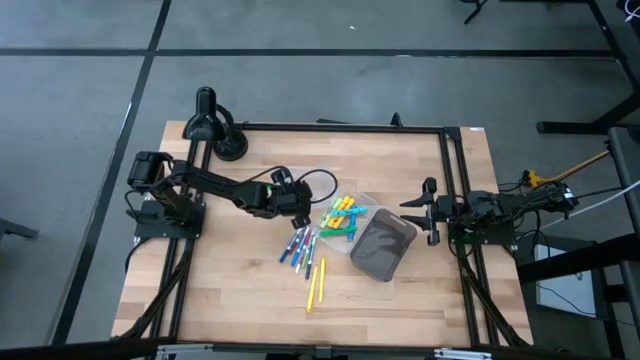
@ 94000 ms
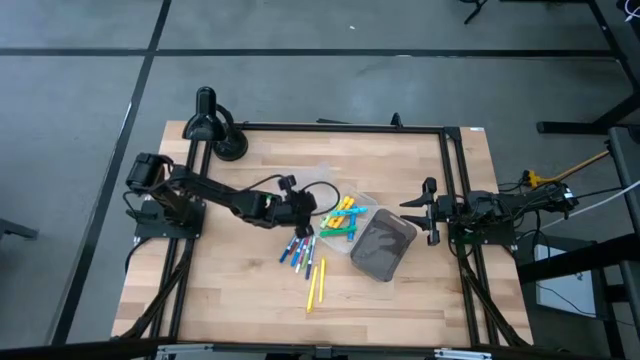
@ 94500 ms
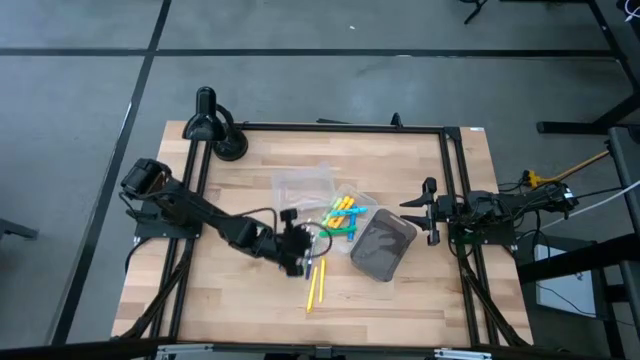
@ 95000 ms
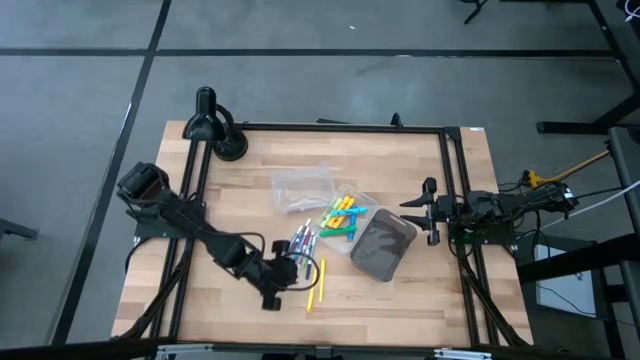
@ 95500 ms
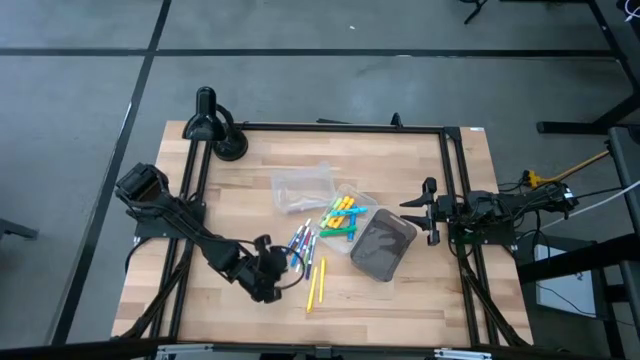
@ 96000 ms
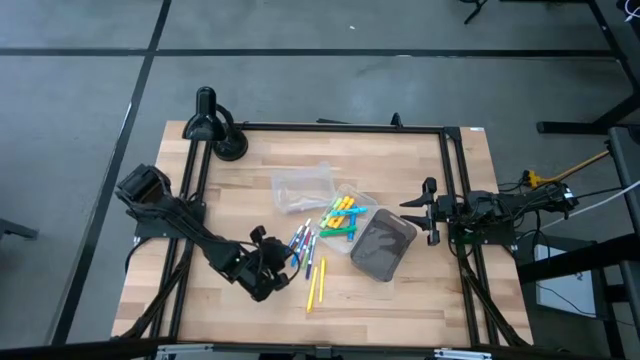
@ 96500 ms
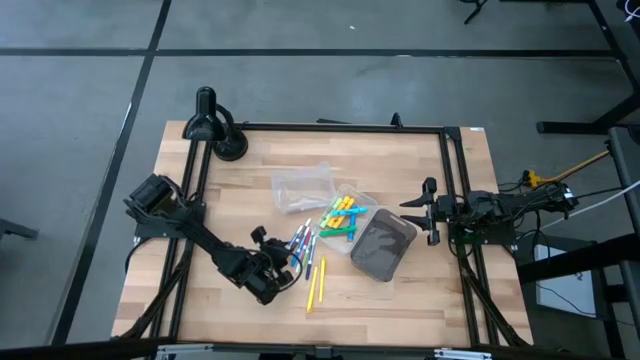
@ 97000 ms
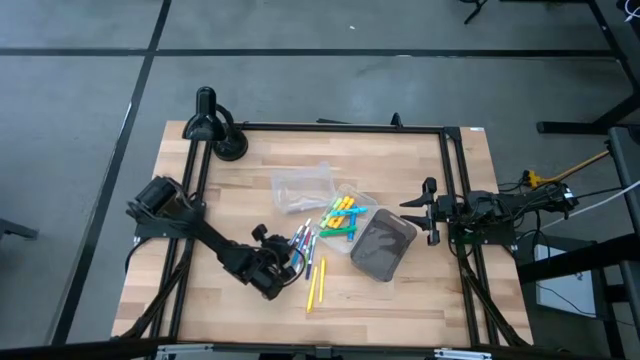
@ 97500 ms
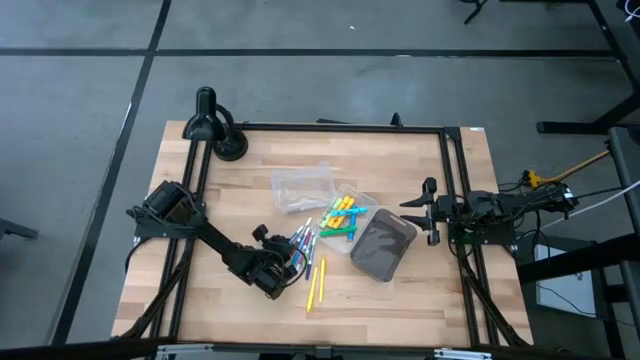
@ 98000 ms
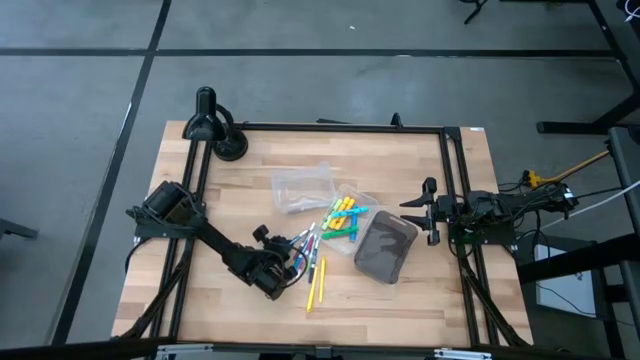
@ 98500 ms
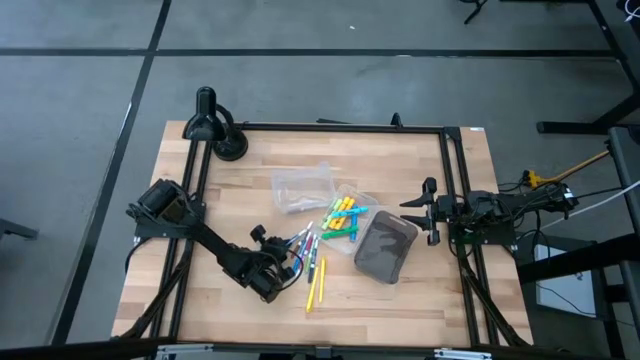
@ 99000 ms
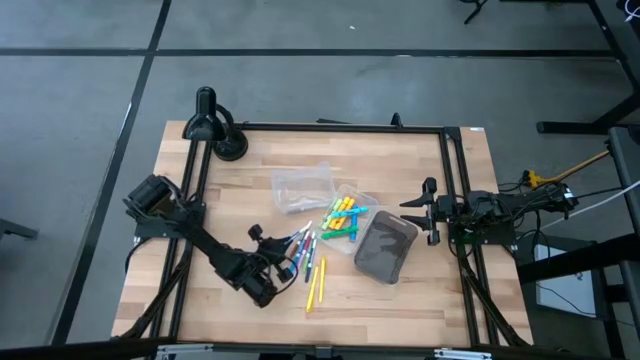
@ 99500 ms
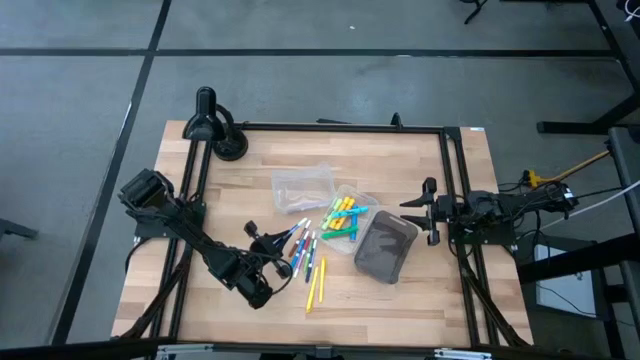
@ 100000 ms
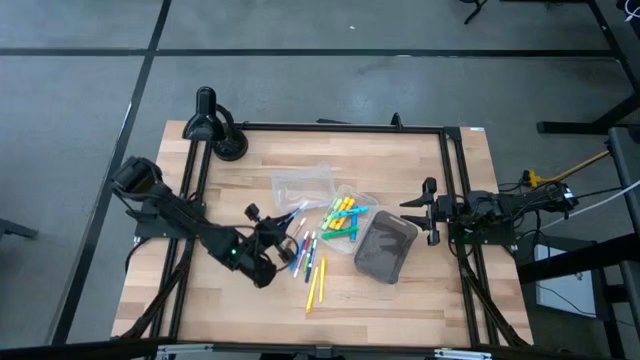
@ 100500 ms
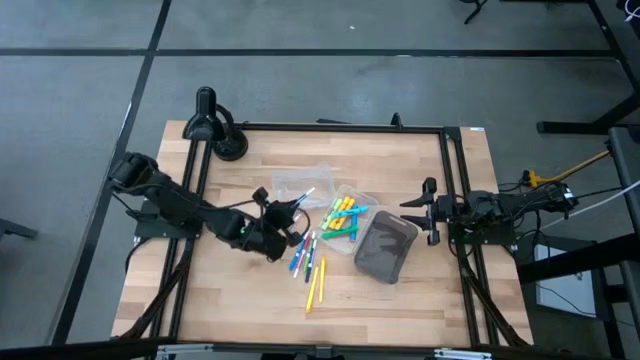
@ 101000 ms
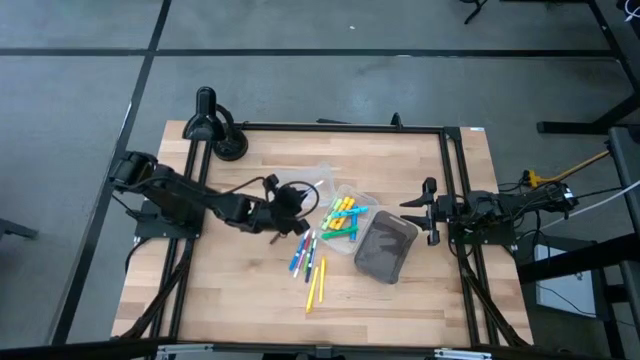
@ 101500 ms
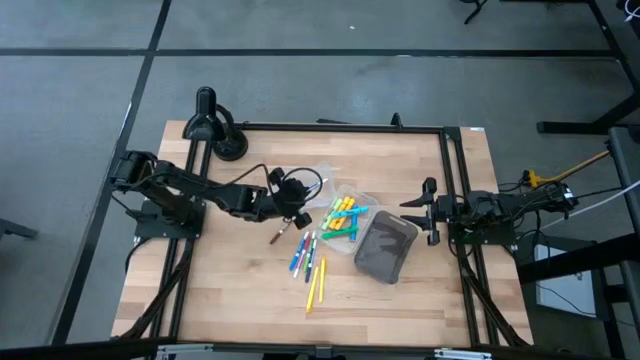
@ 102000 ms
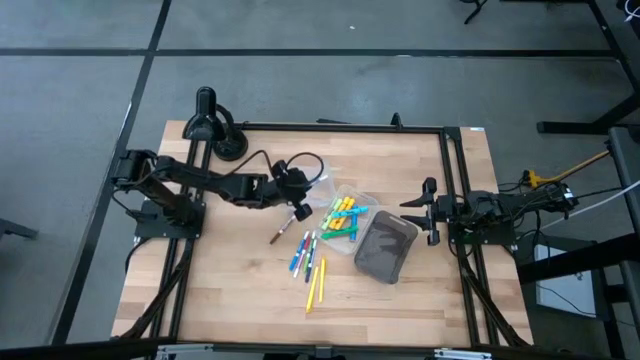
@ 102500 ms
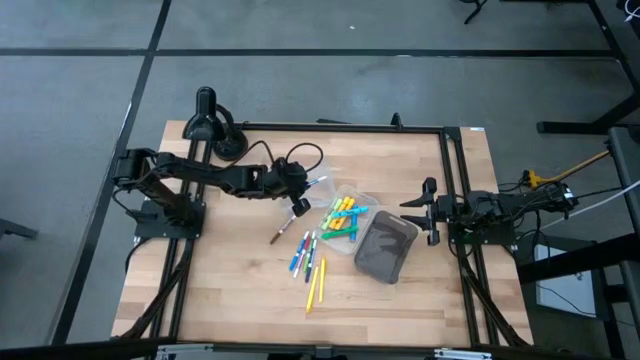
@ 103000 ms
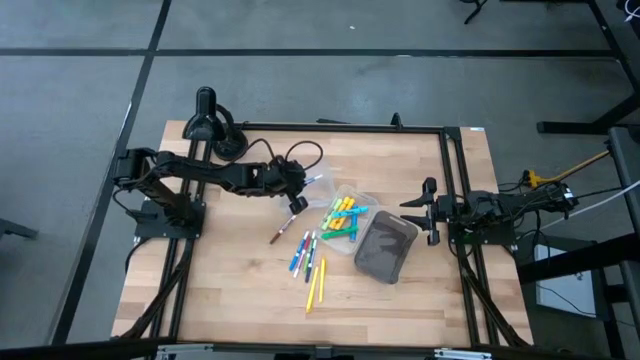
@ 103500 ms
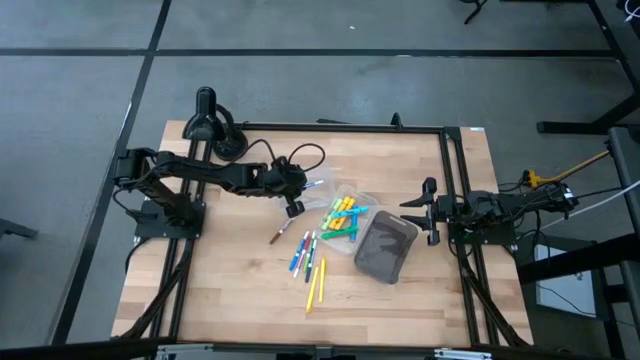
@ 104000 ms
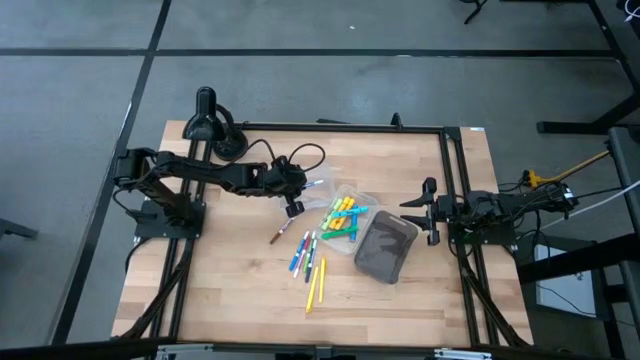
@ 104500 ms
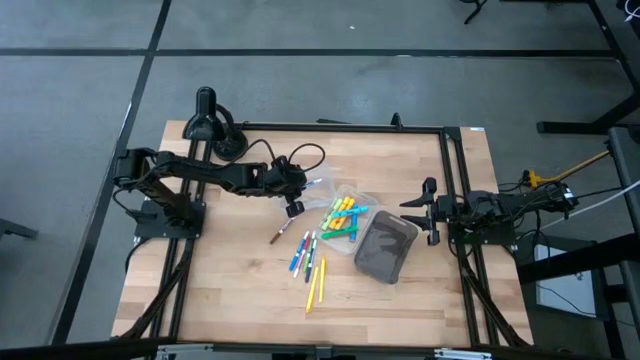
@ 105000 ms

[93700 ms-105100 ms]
Task: Pick & Place Markers
Put the left blue marker pen into the left transparent bin

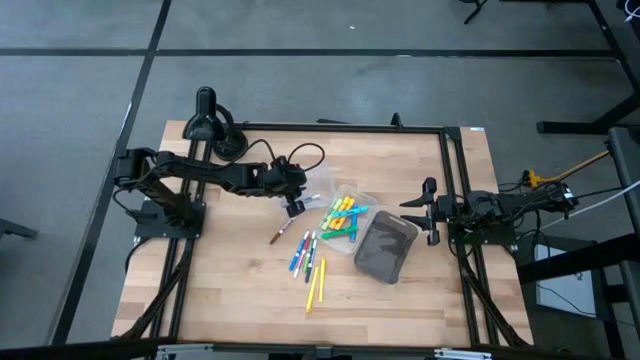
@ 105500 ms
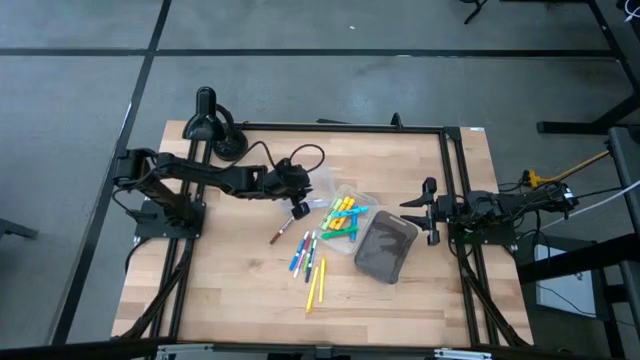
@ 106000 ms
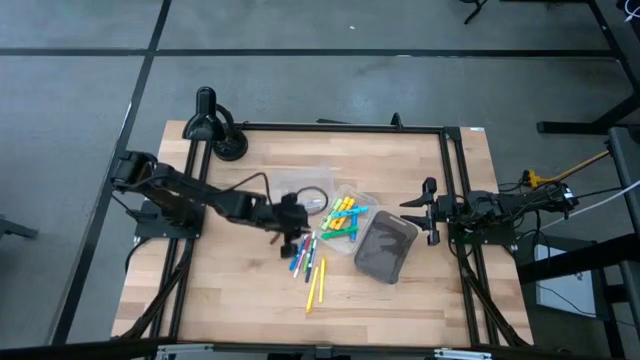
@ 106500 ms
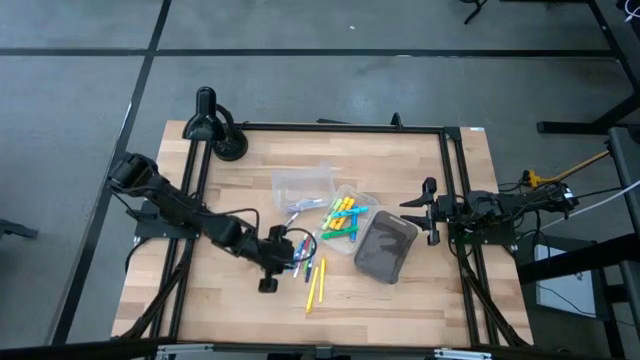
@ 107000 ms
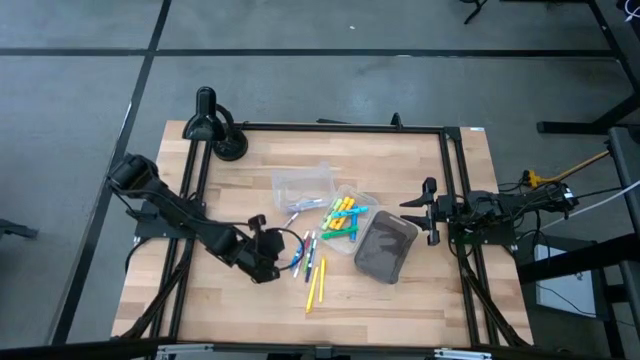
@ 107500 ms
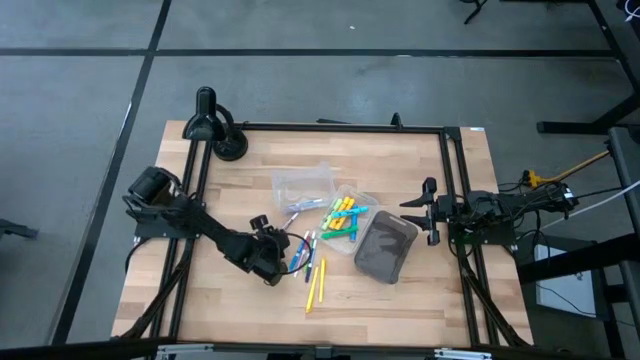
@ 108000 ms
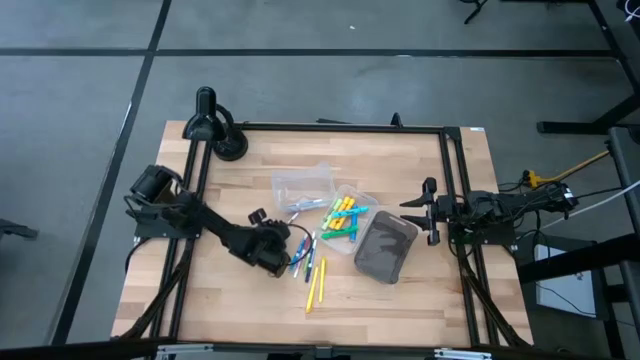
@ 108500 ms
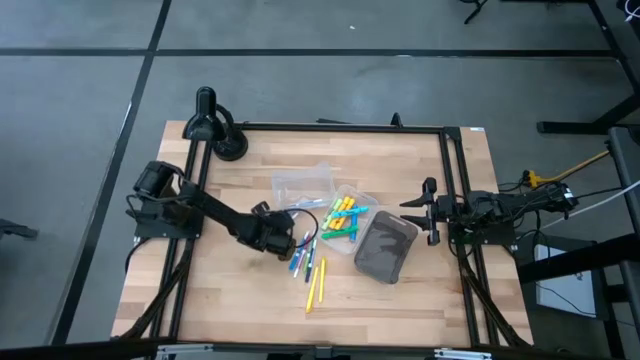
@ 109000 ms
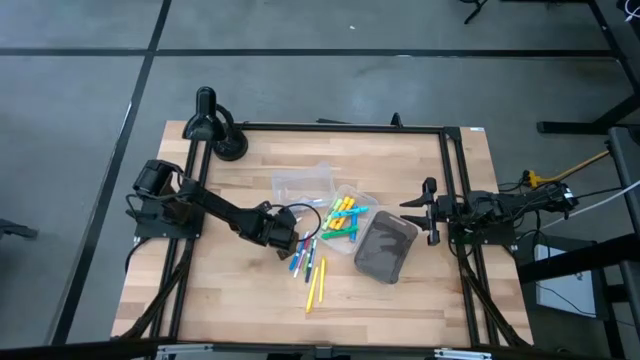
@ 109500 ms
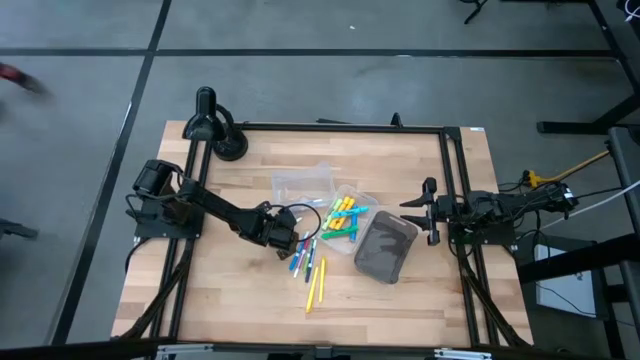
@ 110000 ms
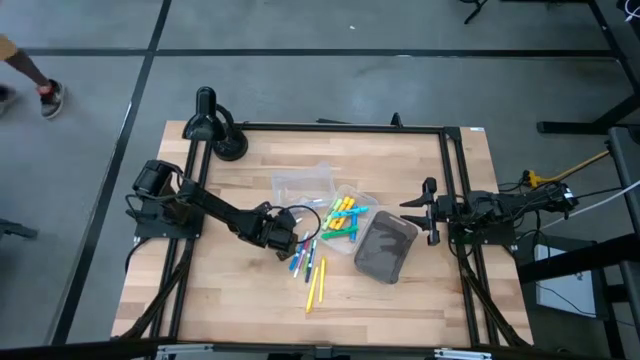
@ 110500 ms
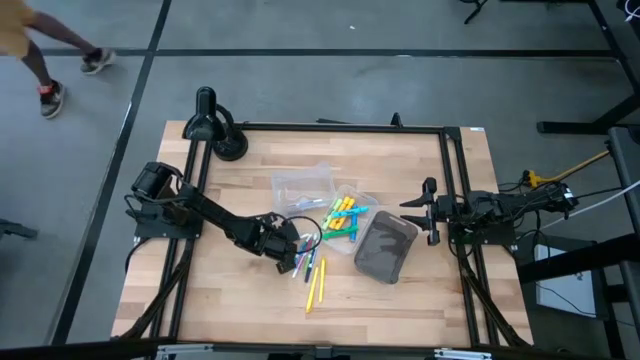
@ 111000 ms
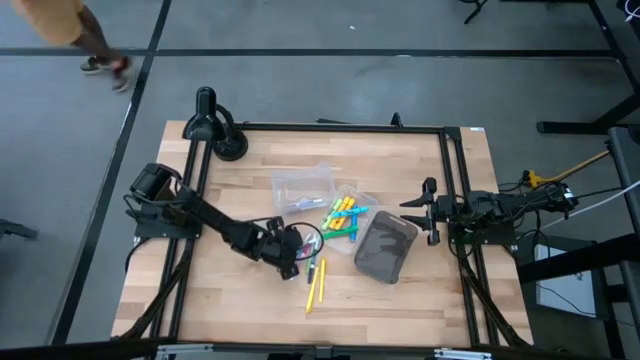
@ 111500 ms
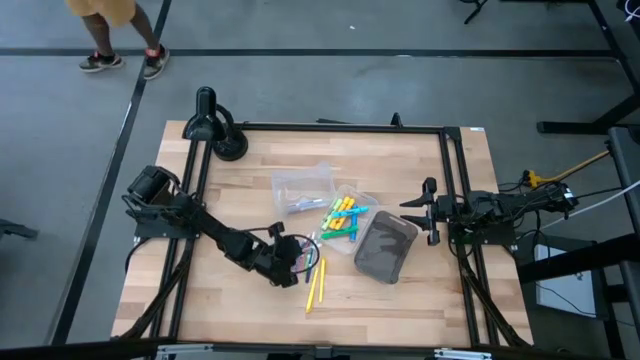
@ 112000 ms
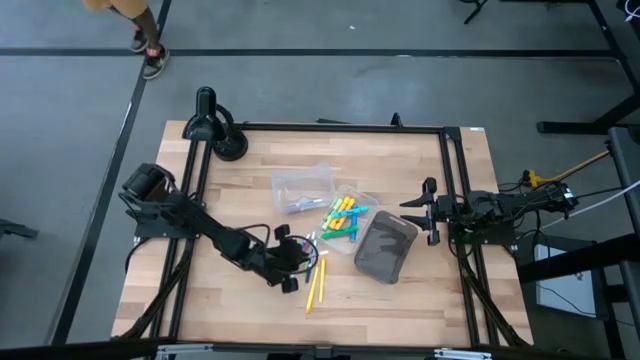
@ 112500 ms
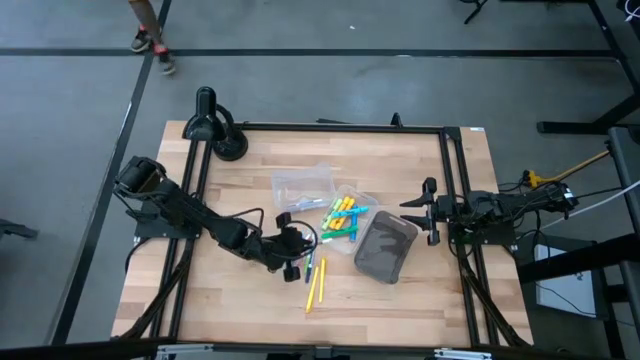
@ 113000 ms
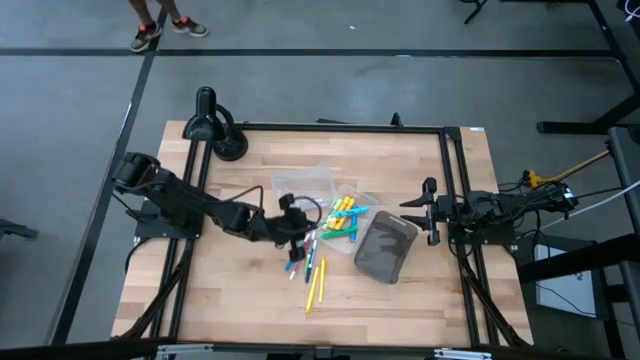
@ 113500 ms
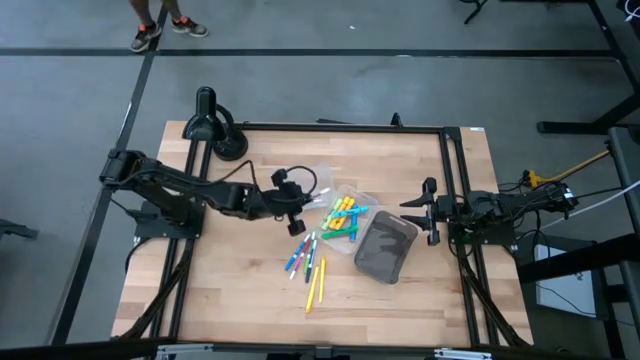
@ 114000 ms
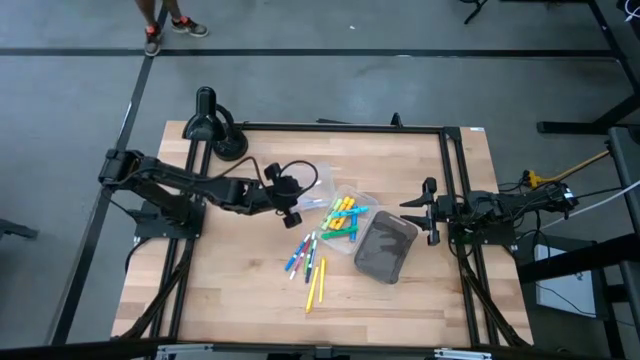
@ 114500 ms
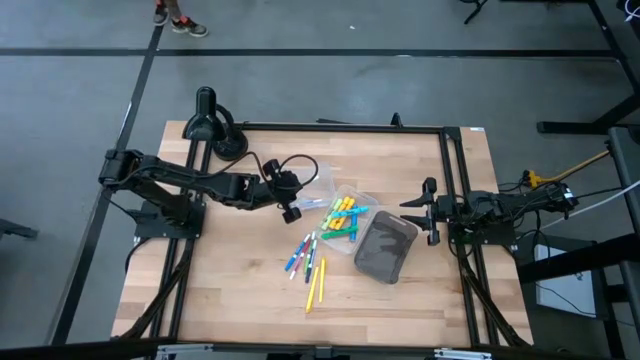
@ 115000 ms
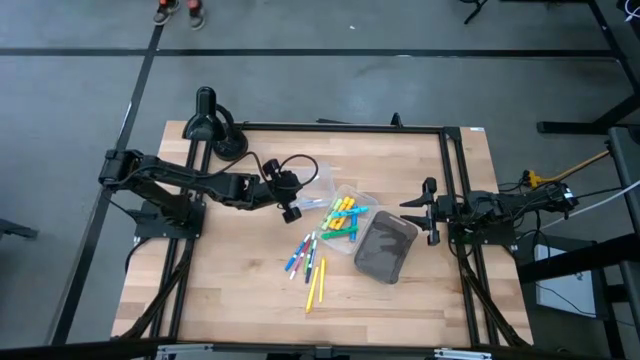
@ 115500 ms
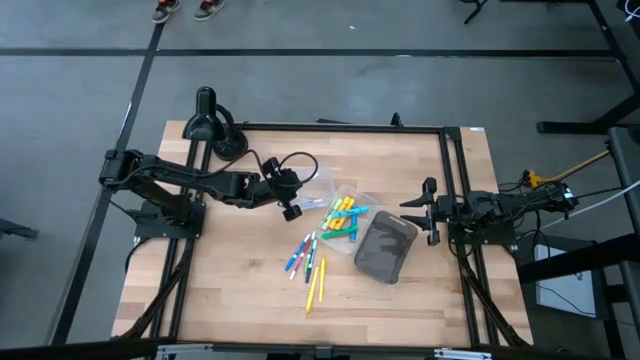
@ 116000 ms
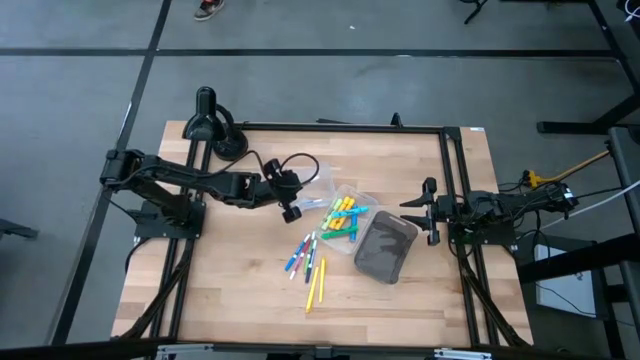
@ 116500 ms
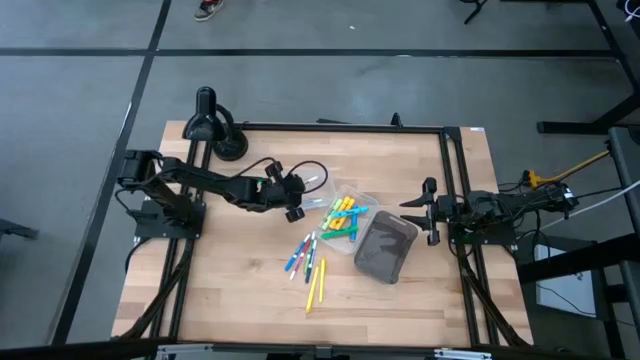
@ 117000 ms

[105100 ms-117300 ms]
Put the brown marker pen into the left transparent bin
